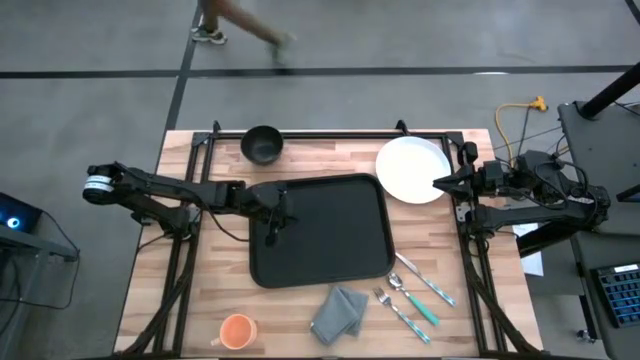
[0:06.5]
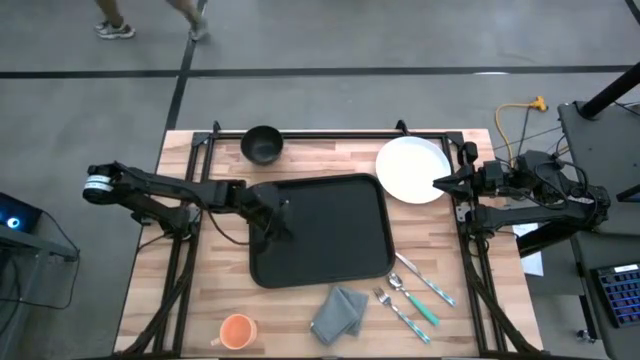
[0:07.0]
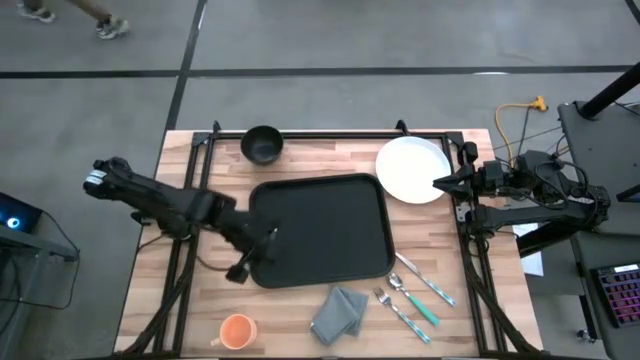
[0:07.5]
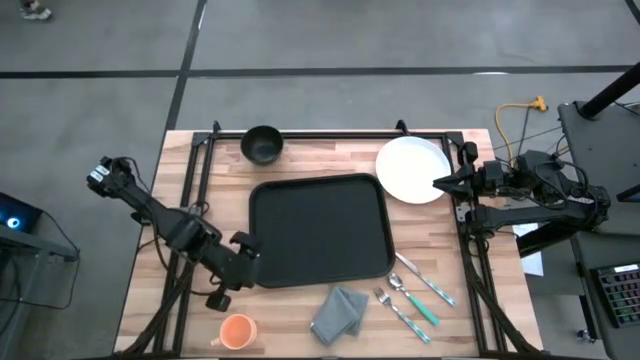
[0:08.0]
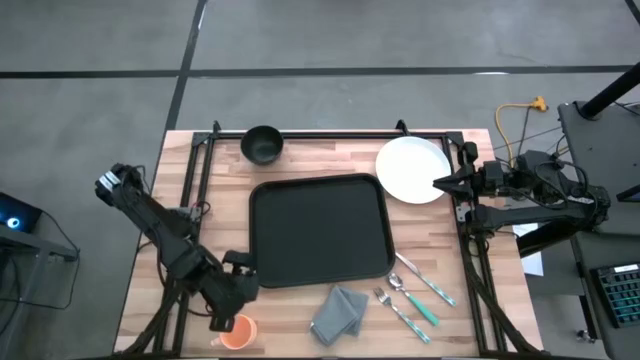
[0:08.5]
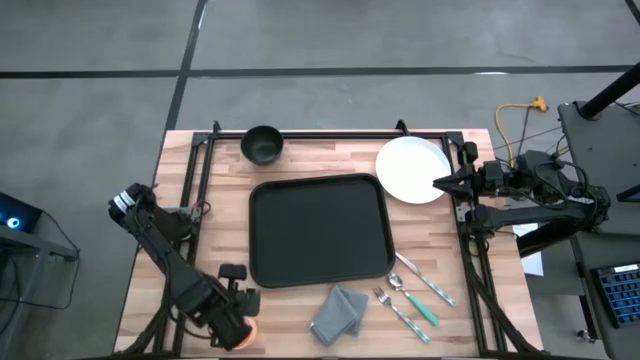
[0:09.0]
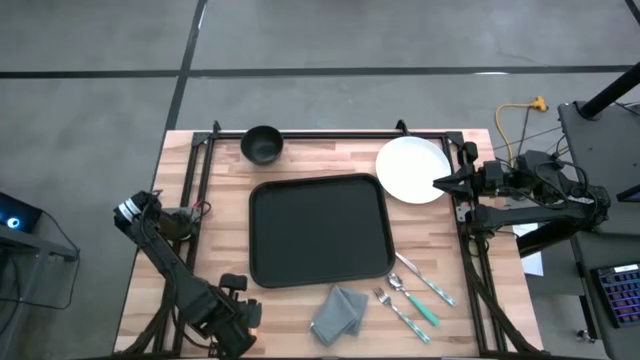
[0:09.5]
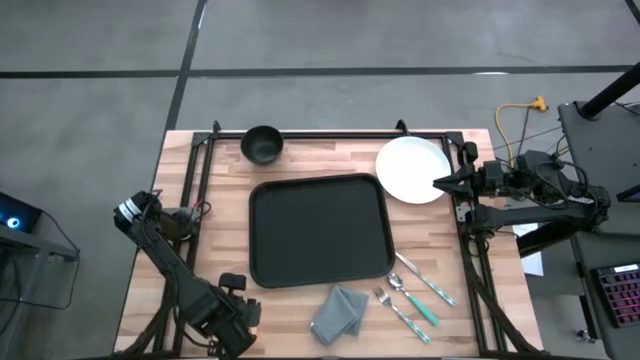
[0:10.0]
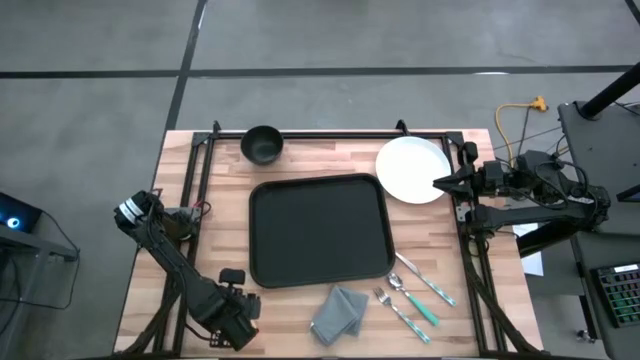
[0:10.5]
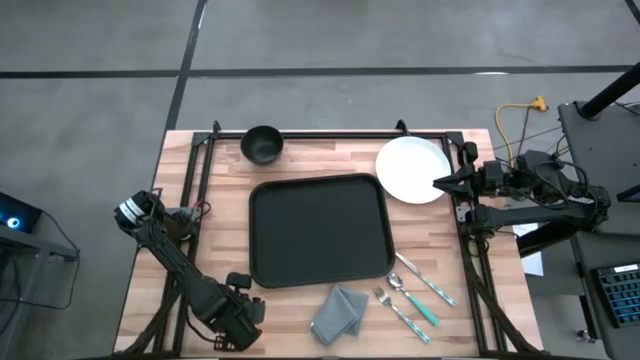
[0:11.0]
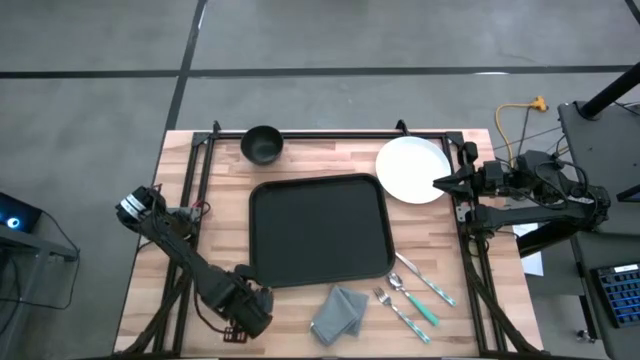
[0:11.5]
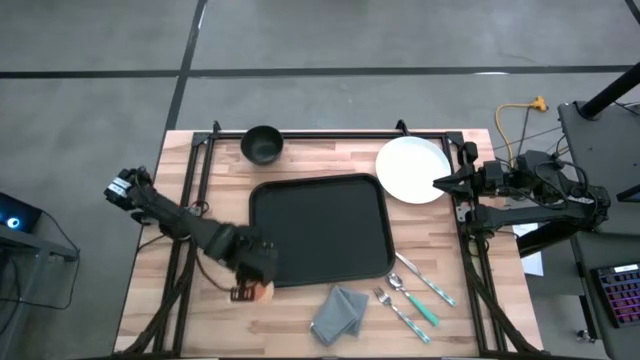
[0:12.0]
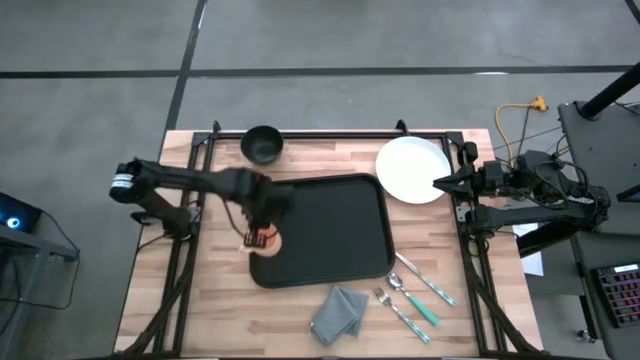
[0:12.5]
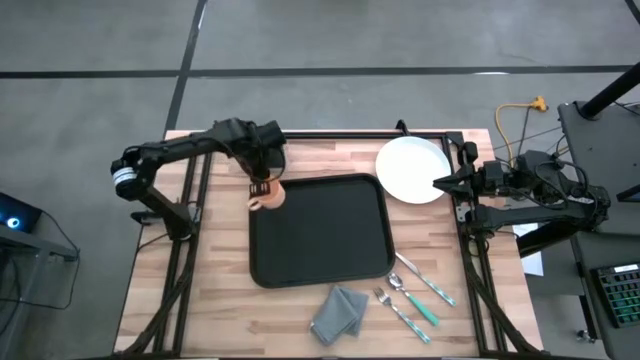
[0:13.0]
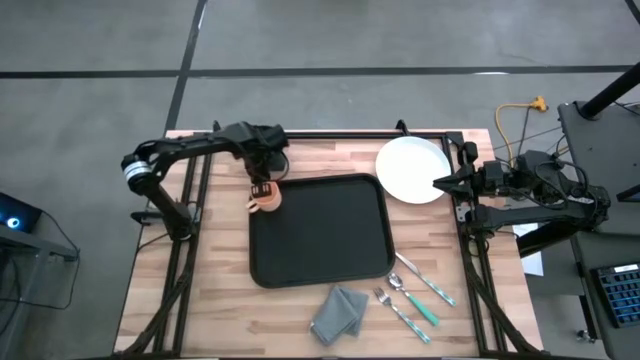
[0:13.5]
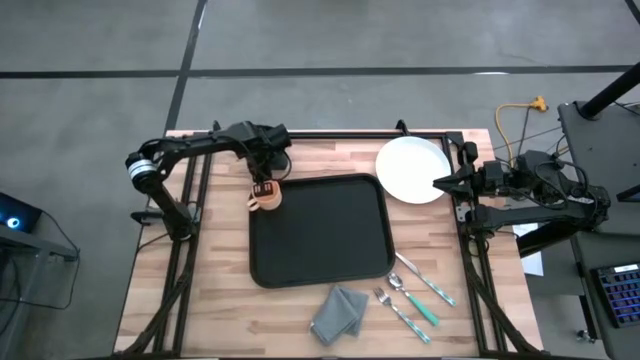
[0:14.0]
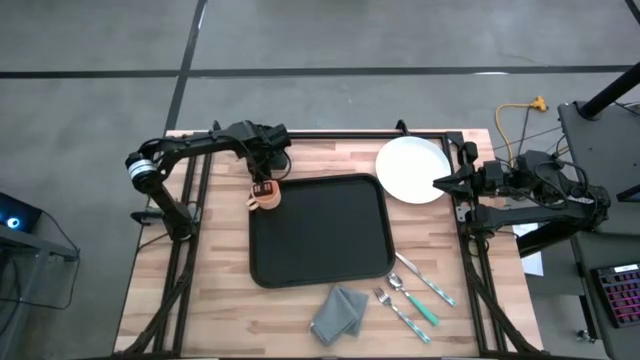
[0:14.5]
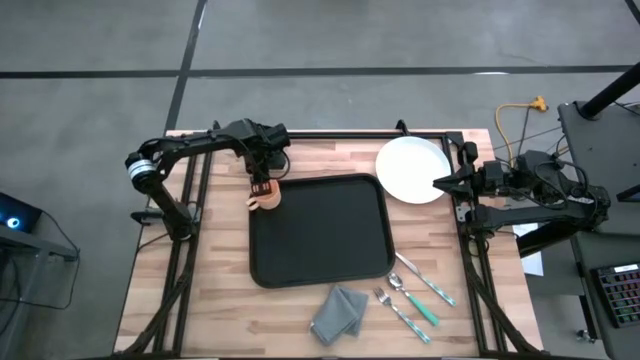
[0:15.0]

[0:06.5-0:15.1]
Task: Set up tray
Put the orange mug on the black serving tray

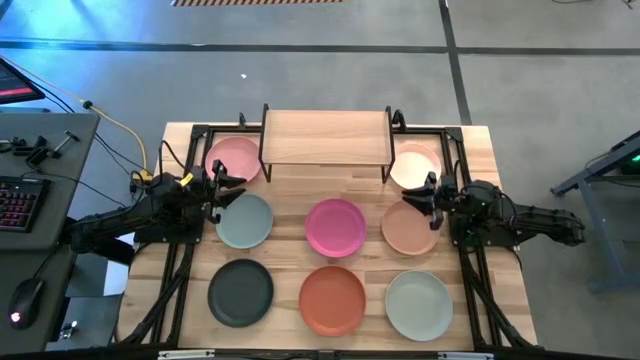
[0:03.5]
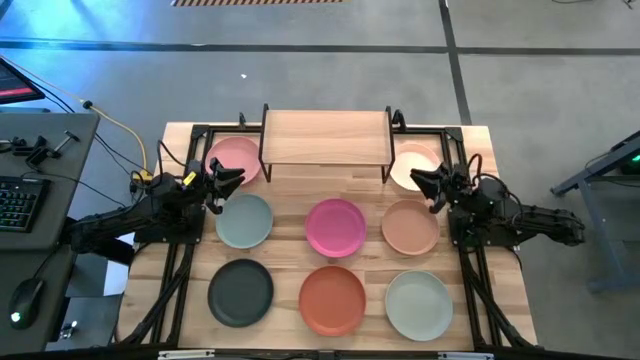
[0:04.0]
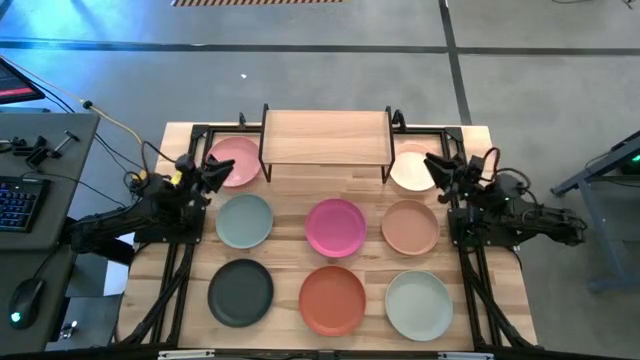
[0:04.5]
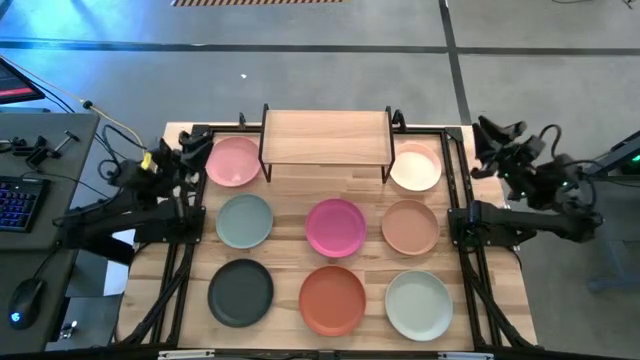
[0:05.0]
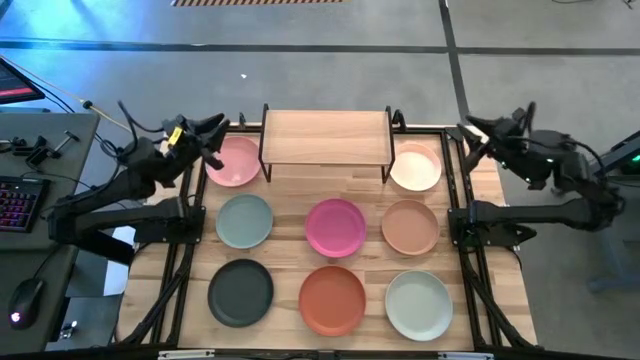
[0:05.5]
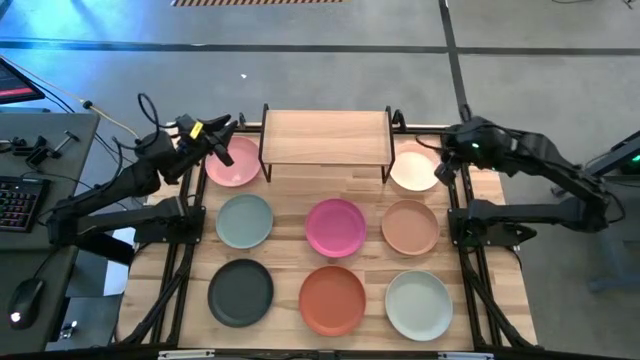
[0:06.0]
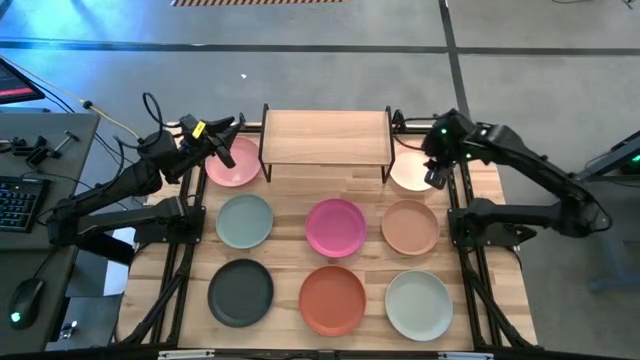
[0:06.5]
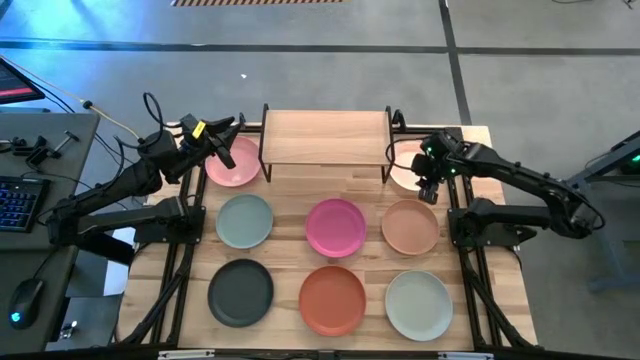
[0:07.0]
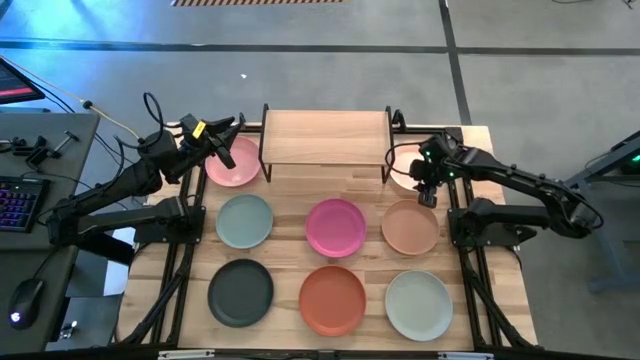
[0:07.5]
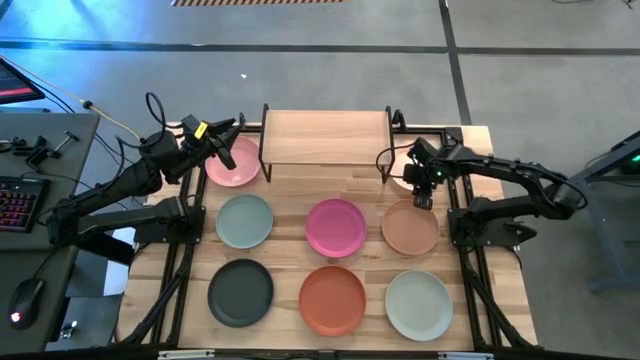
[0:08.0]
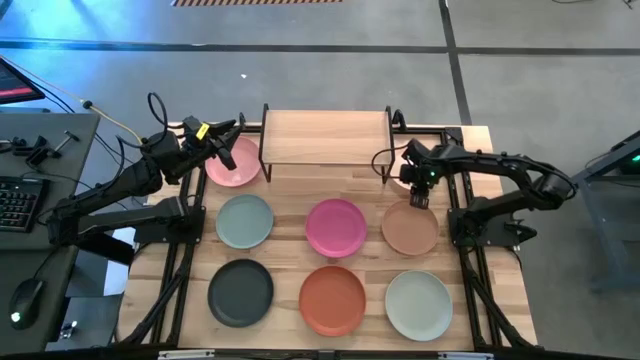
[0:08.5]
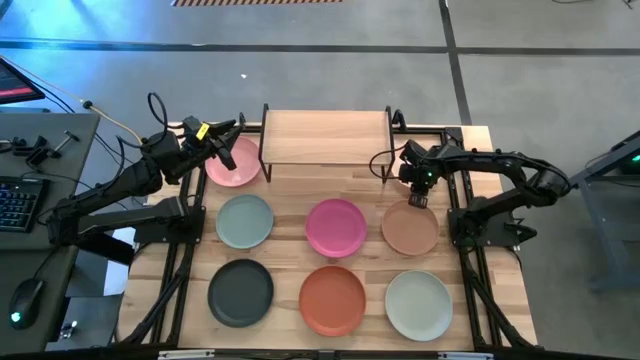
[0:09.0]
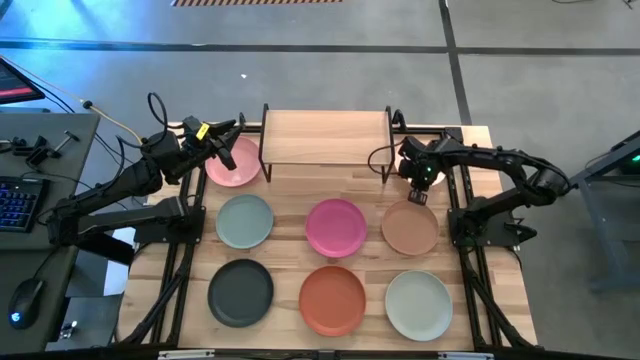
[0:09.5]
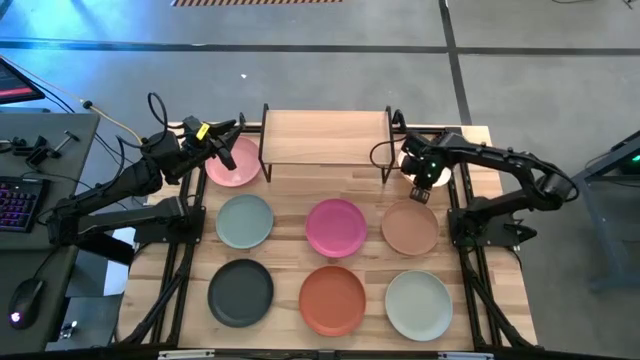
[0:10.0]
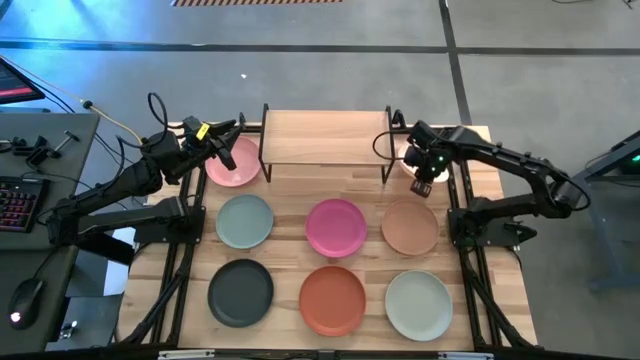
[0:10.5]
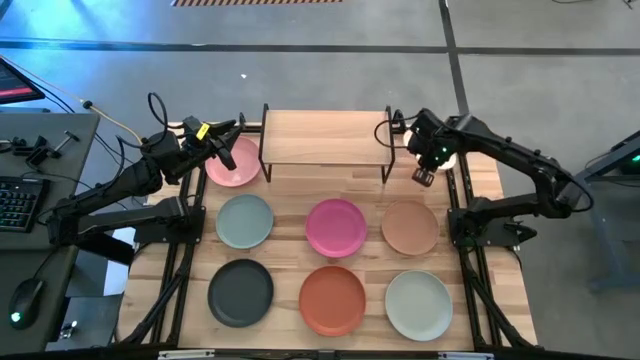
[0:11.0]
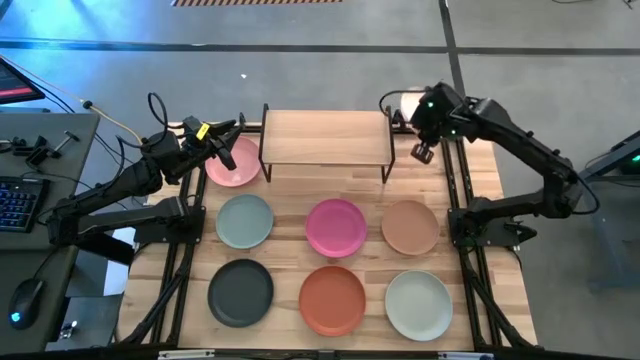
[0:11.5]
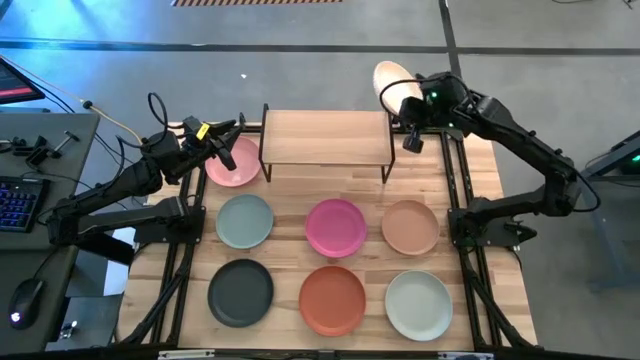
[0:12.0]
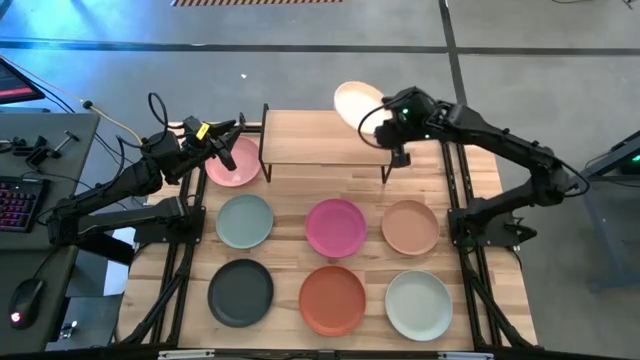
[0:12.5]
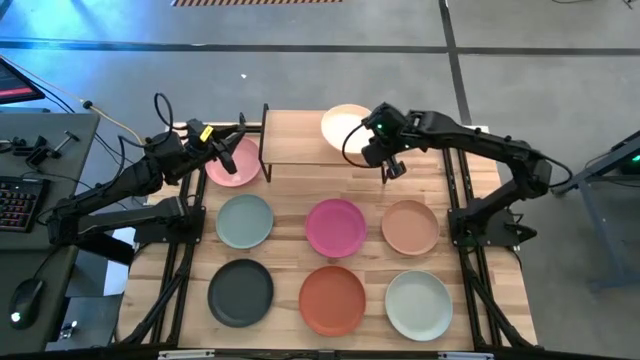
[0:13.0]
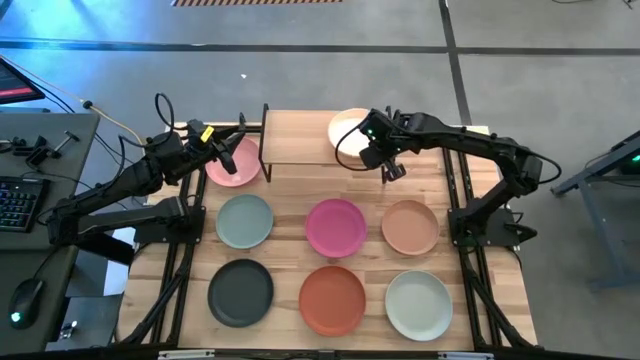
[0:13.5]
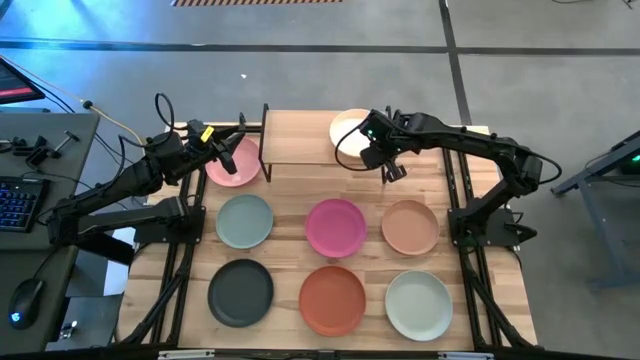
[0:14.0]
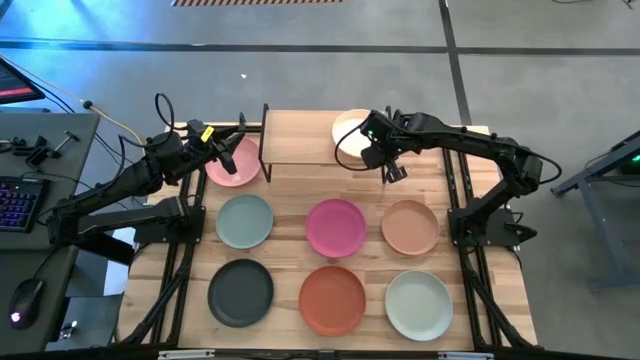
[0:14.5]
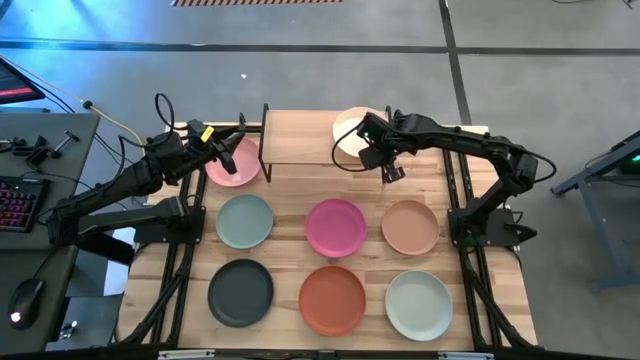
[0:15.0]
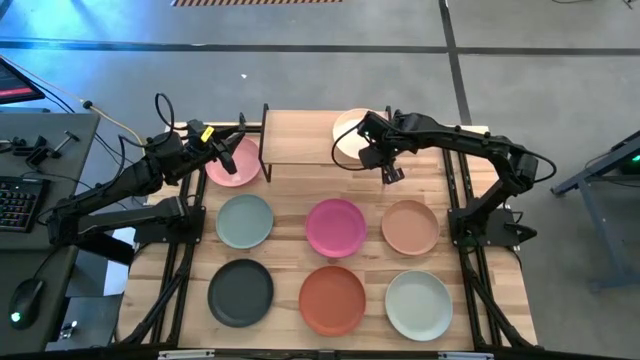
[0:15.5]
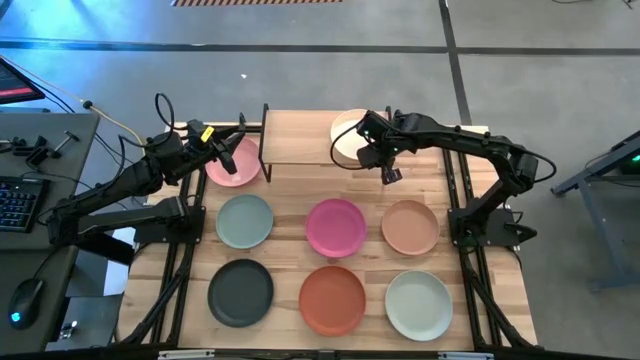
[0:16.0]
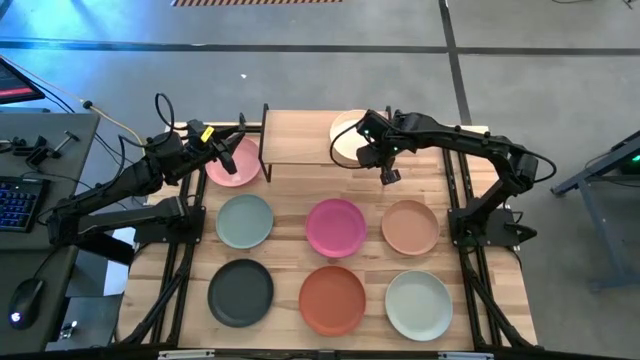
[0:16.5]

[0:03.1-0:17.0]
Task: Place and stack plates onto a shelf
Put the light orange plate on the shelf
